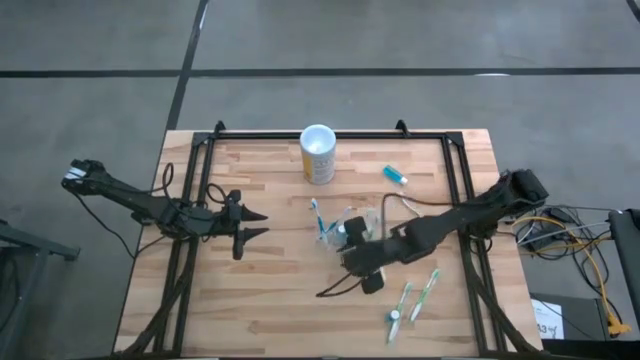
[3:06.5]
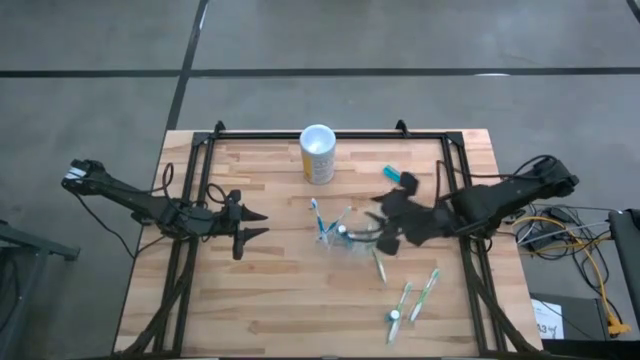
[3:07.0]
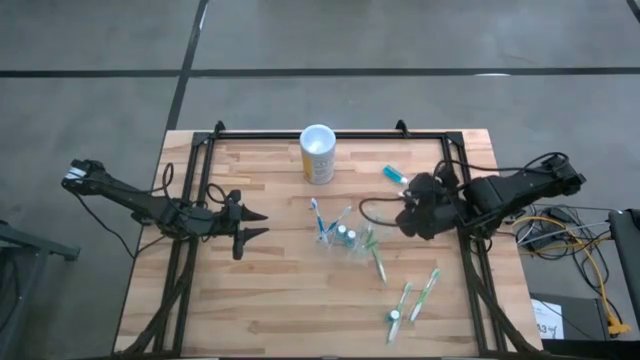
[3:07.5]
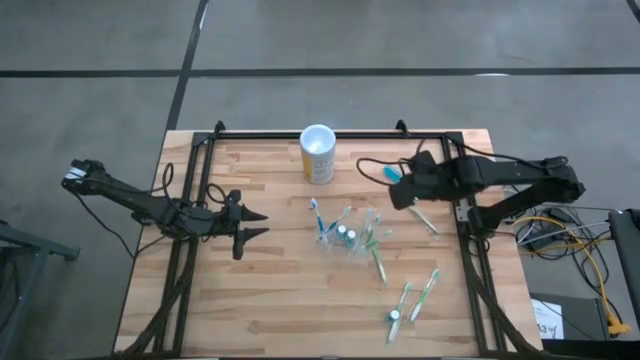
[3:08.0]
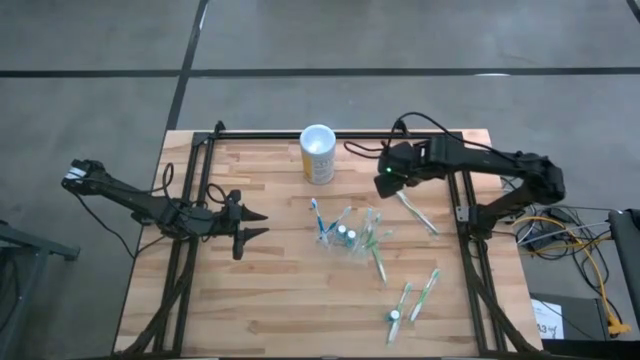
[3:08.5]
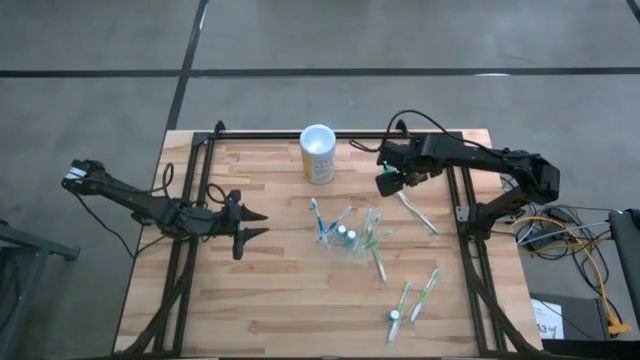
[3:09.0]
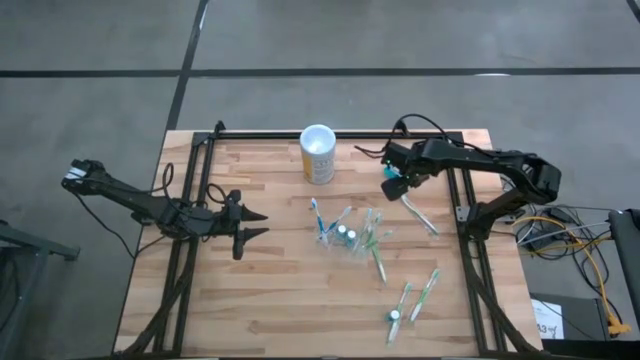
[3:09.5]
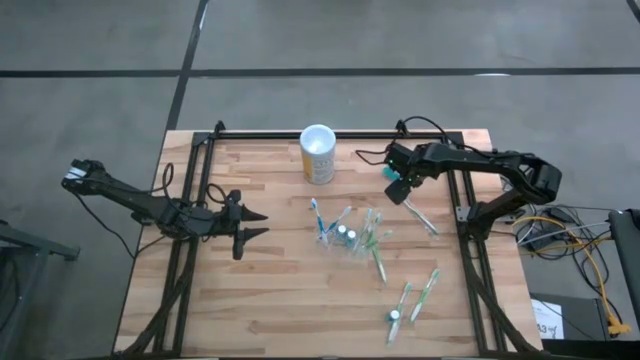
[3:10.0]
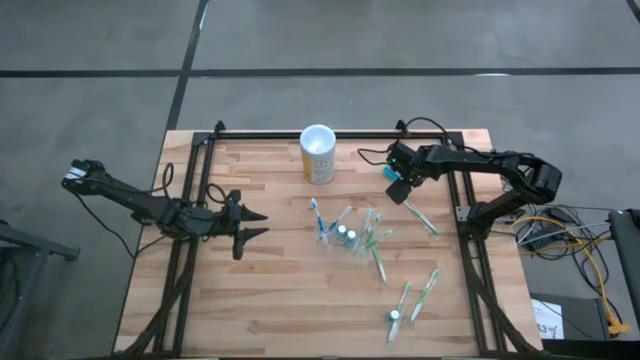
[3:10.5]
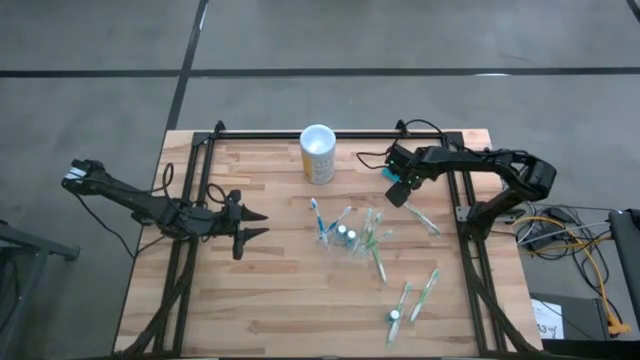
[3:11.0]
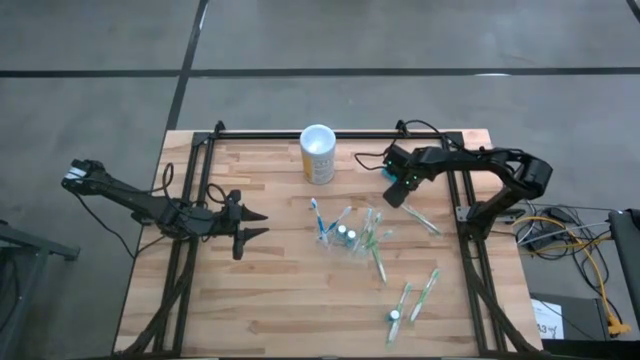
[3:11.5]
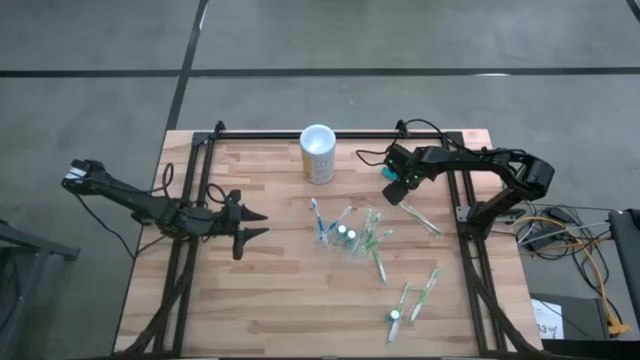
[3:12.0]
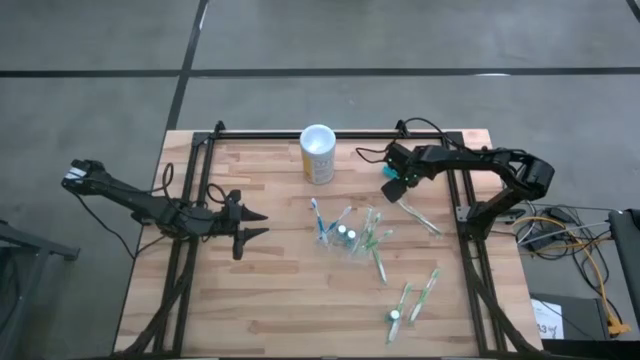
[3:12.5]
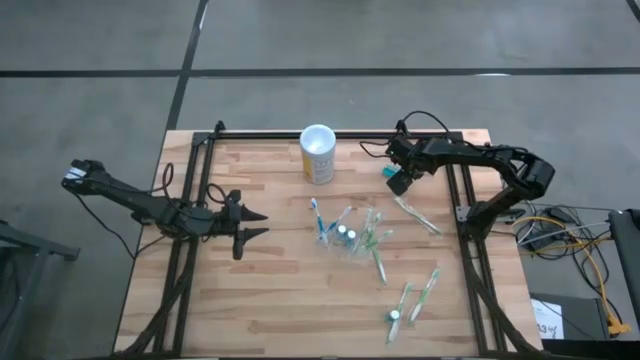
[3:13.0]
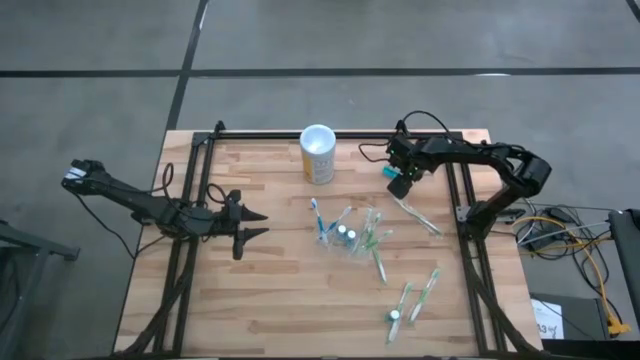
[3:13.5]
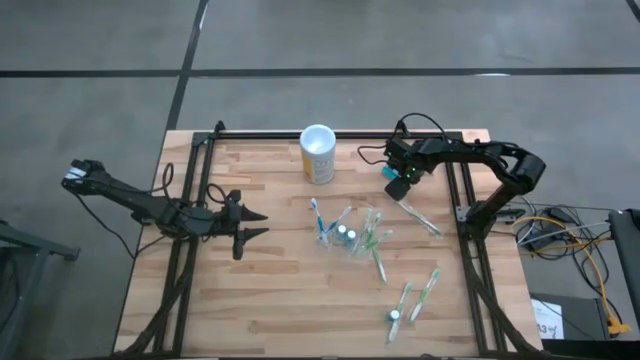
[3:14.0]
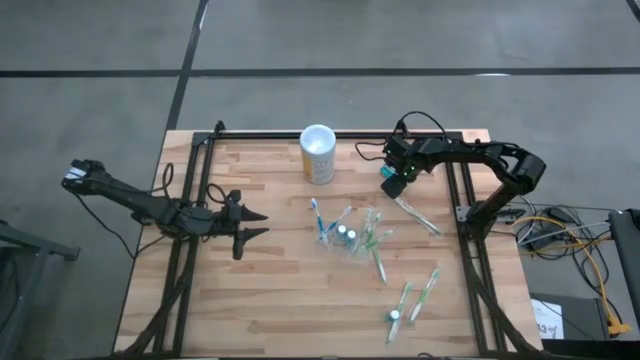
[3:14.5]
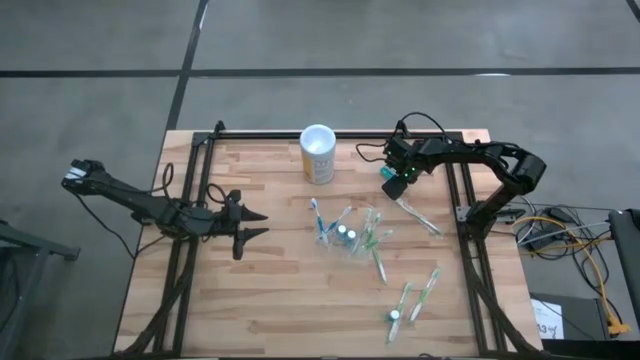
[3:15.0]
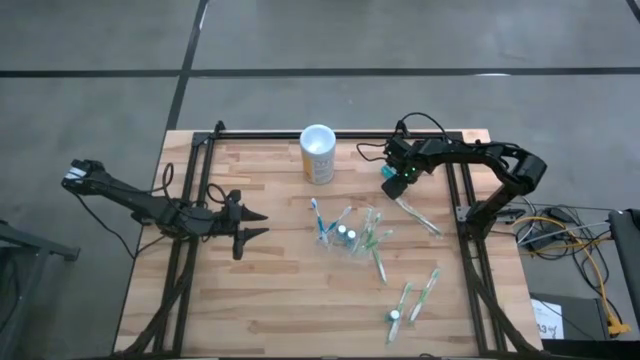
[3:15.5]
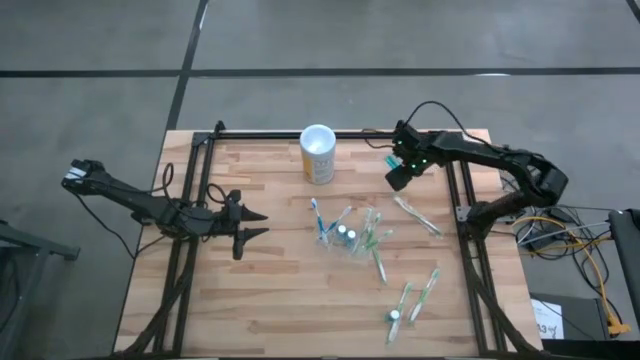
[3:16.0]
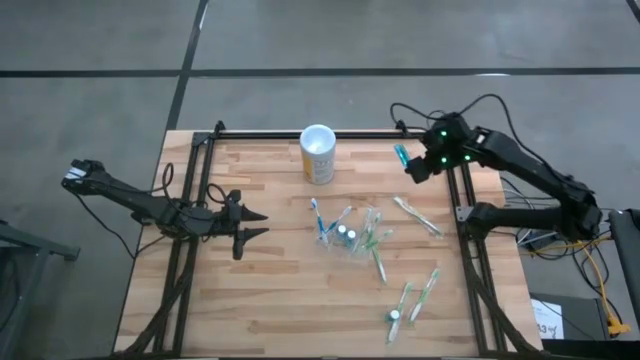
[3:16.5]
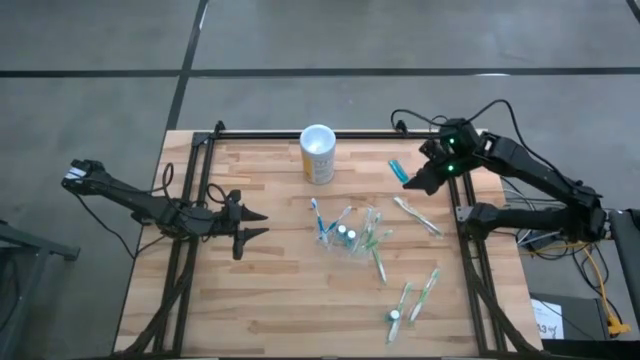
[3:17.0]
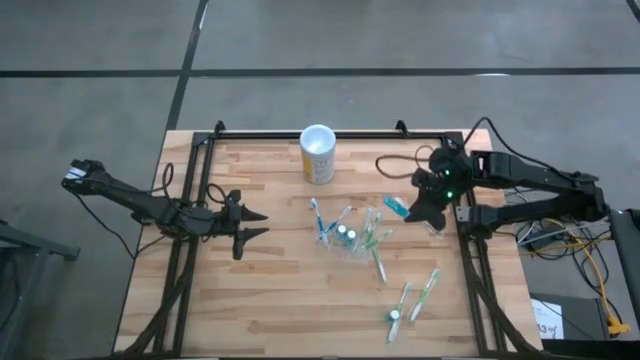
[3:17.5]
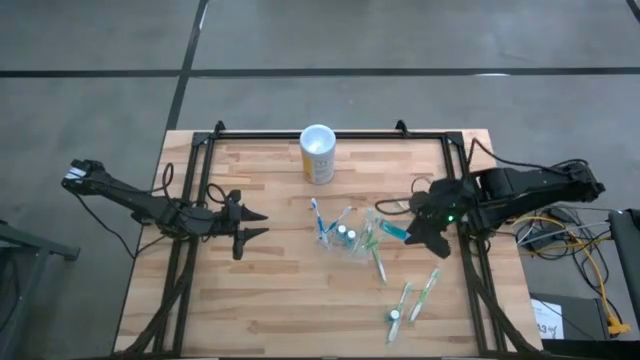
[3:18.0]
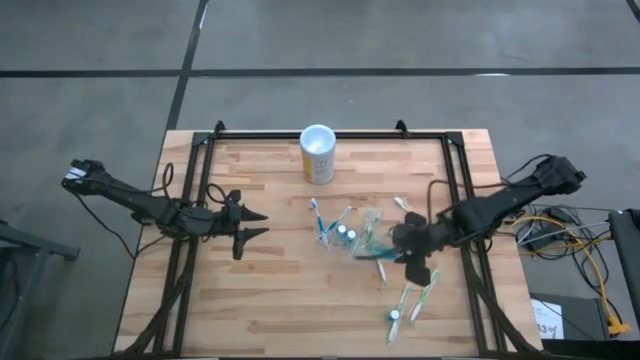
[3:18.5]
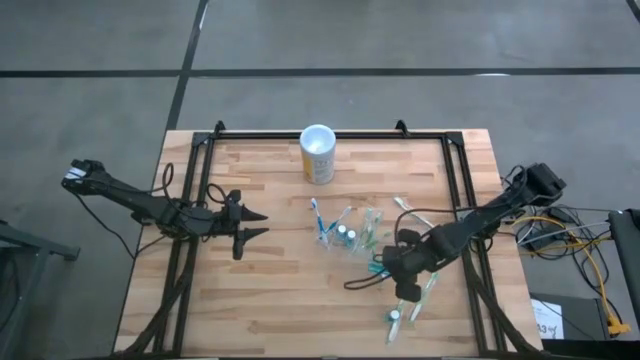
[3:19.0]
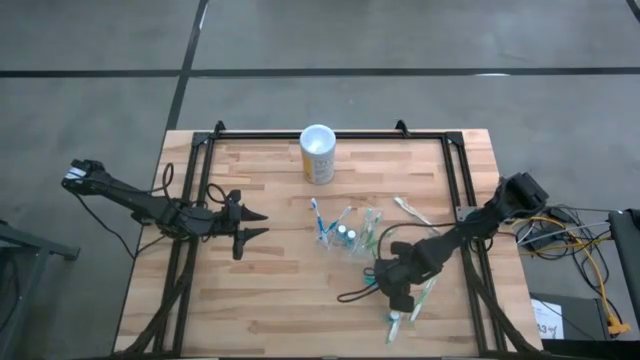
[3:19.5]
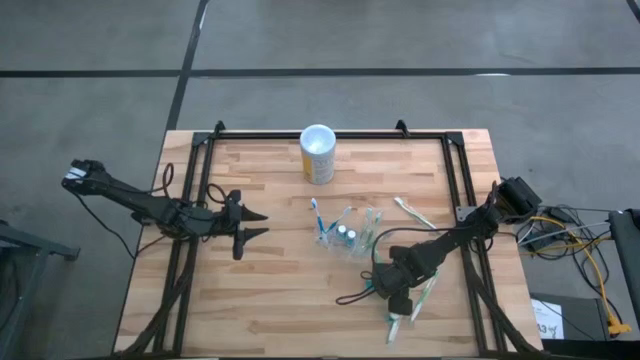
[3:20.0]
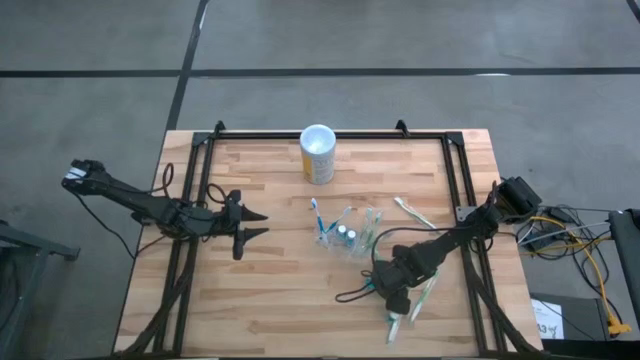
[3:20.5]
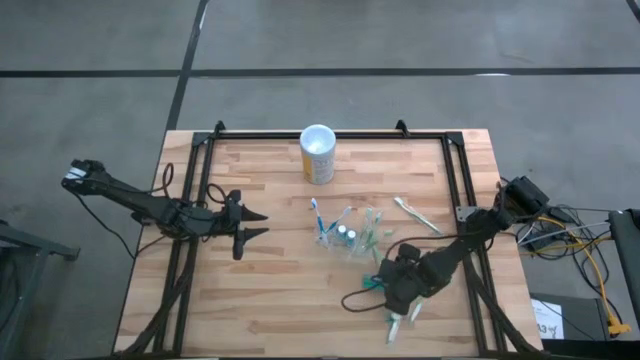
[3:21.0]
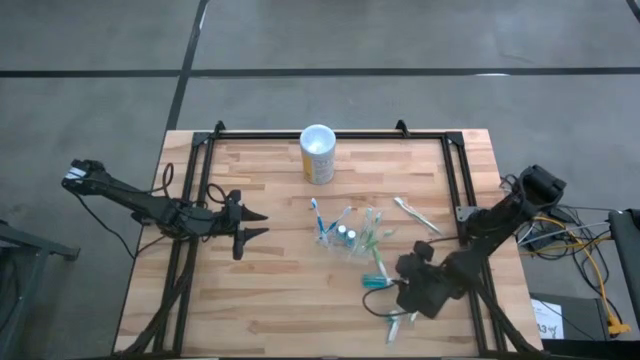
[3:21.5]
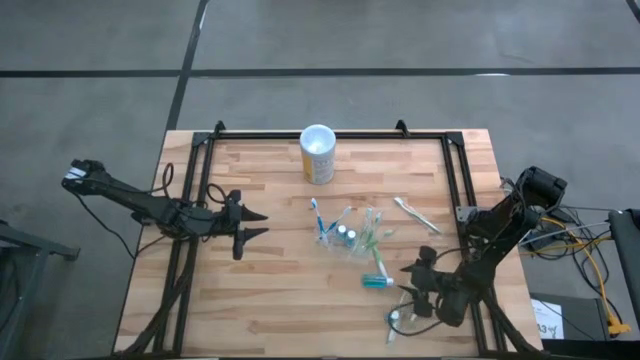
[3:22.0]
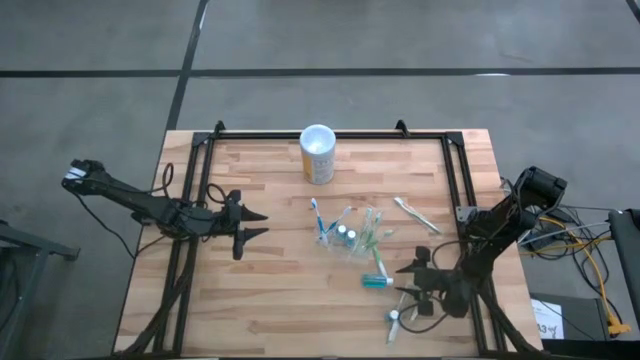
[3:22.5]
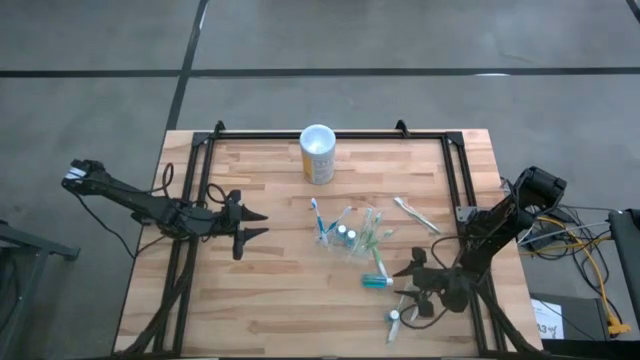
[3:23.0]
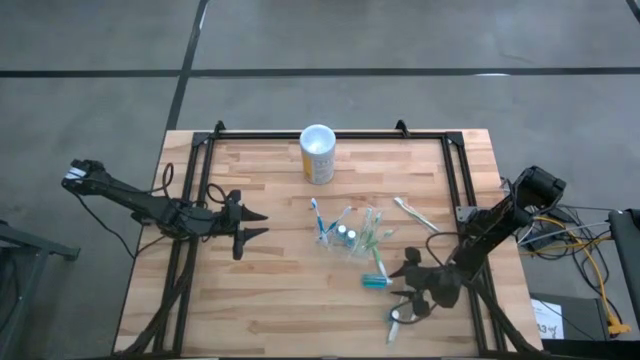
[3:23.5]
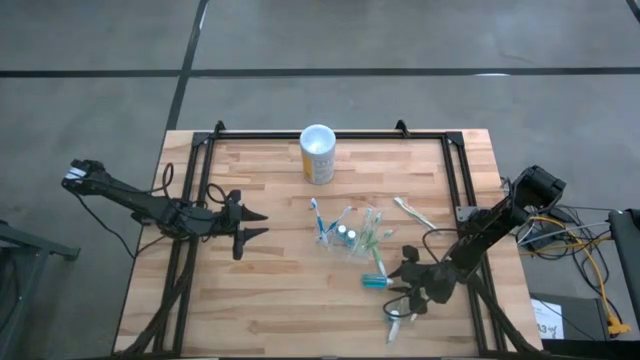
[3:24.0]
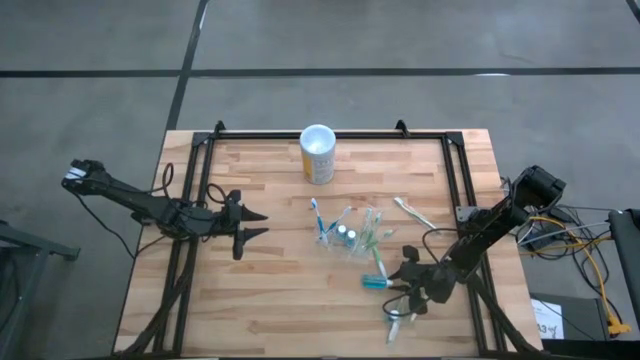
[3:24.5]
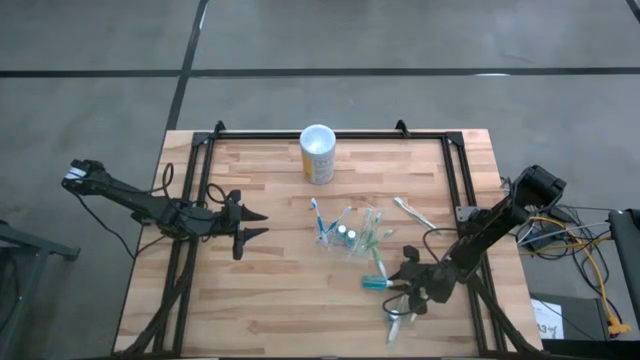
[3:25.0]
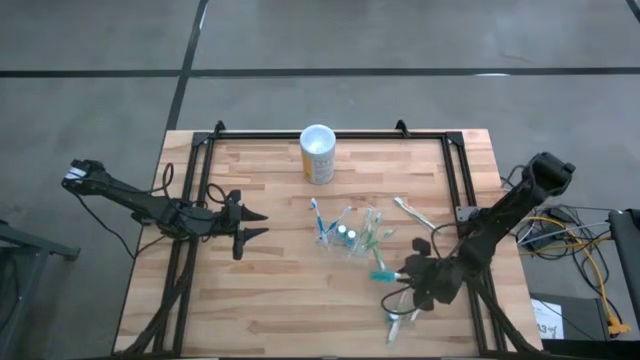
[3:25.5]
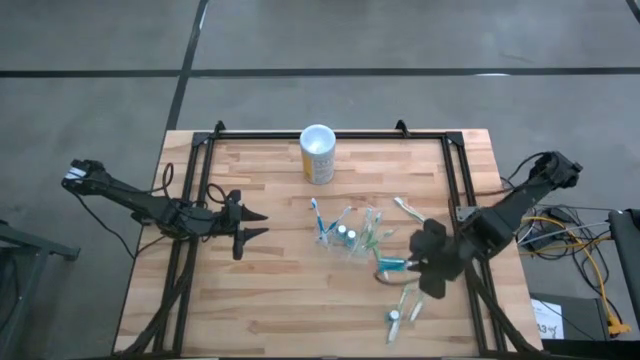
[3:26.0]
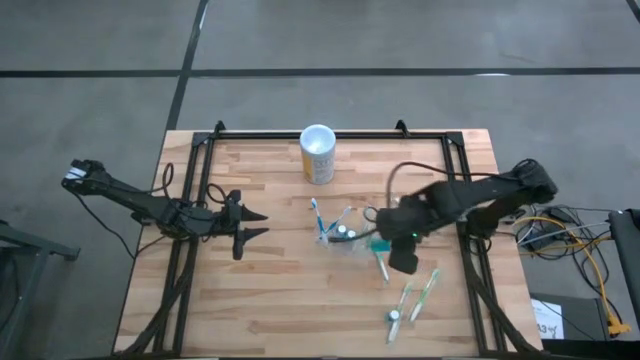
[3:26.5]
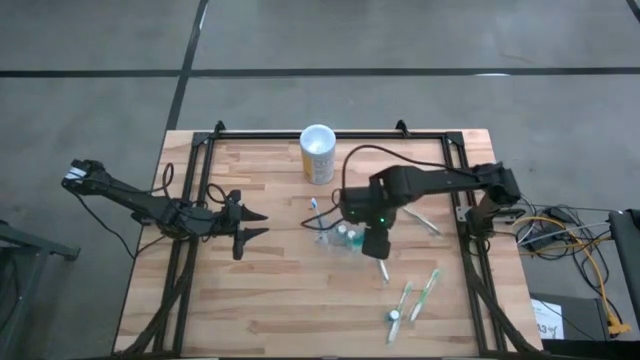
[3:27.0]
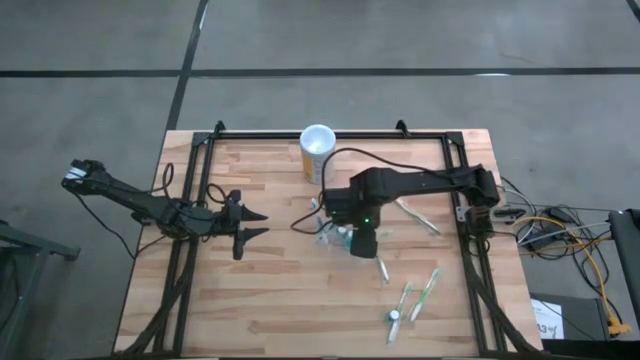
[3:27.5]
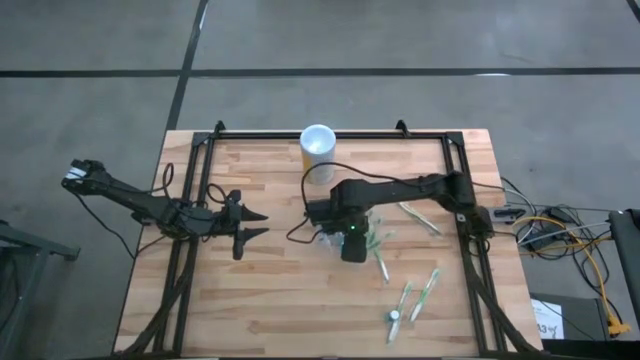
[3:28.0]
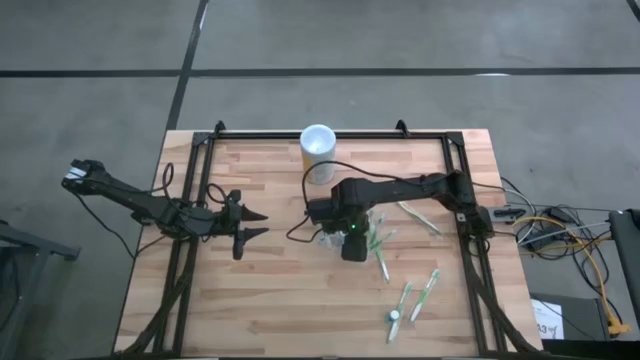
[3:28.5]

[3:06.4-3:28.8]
Task: Pick & Place toothbrushing station
Put the blue mouthwash into the middle section of the transparent organizer
